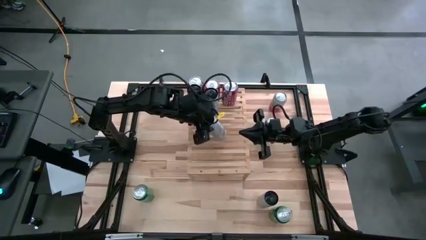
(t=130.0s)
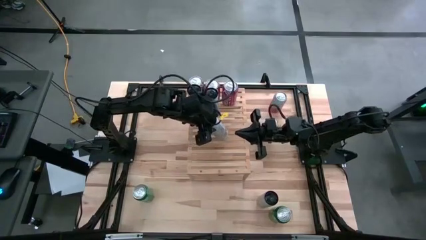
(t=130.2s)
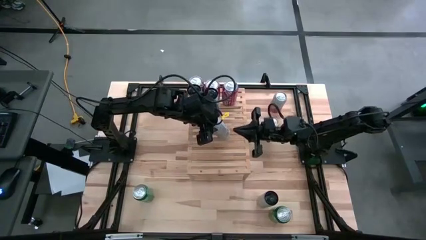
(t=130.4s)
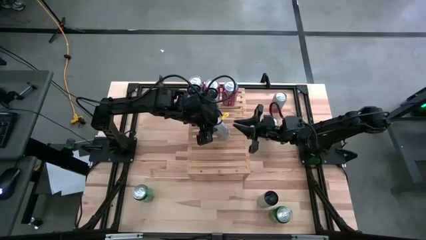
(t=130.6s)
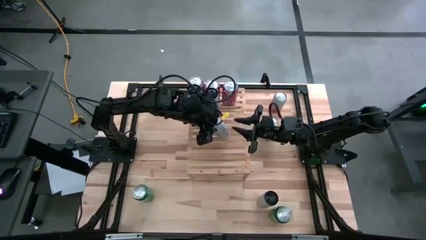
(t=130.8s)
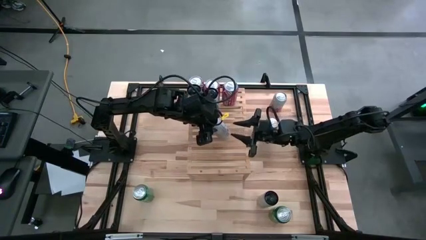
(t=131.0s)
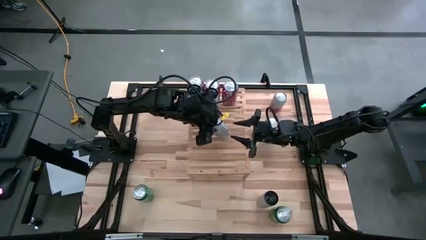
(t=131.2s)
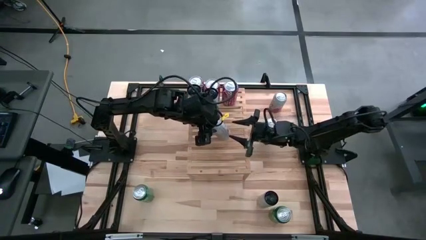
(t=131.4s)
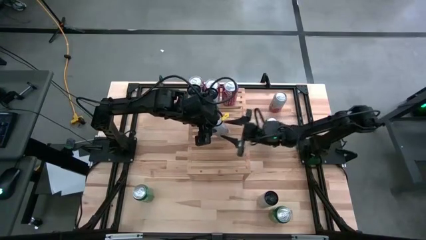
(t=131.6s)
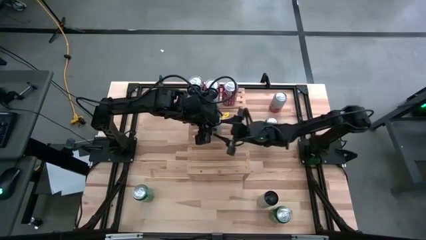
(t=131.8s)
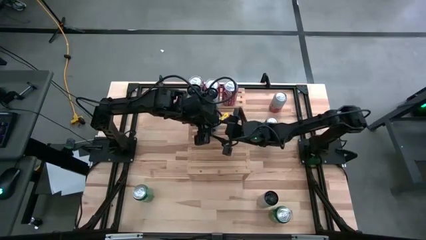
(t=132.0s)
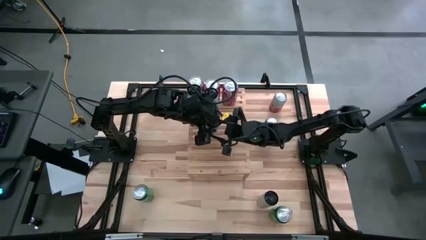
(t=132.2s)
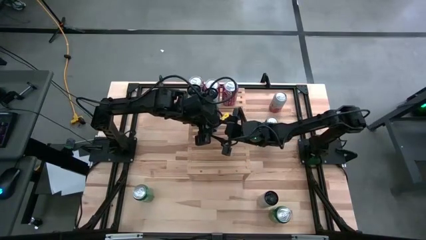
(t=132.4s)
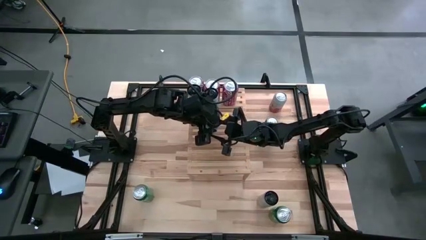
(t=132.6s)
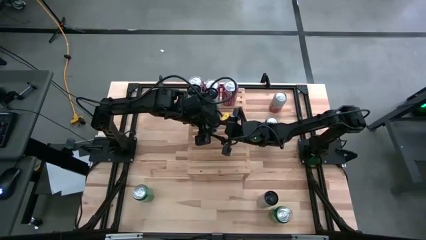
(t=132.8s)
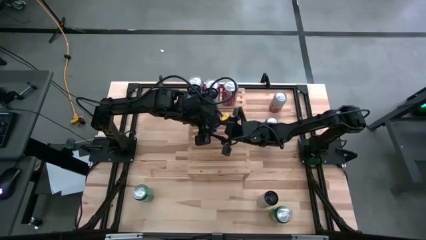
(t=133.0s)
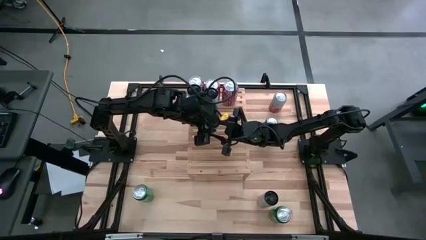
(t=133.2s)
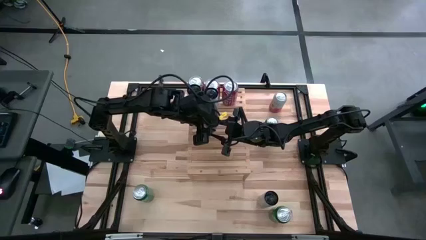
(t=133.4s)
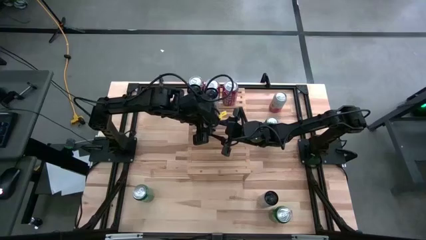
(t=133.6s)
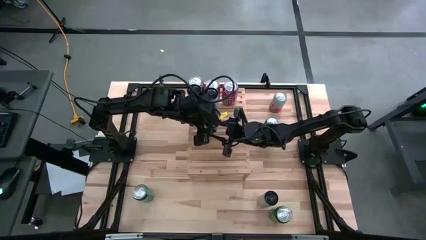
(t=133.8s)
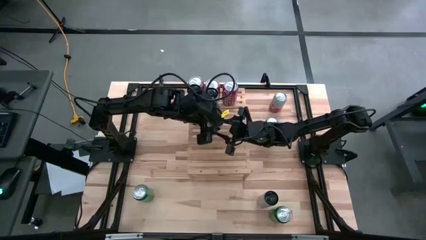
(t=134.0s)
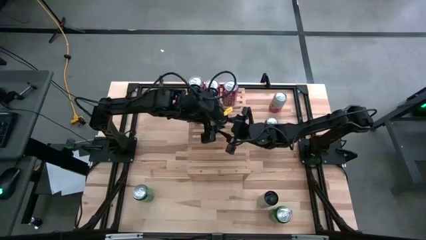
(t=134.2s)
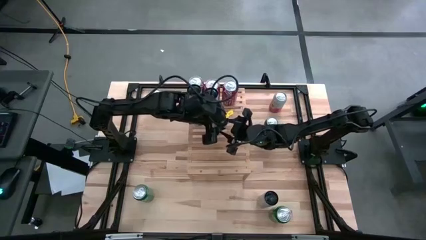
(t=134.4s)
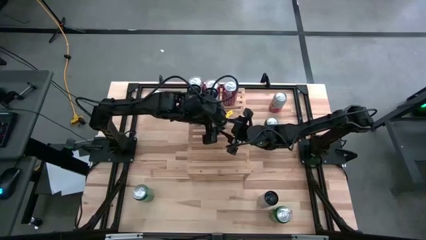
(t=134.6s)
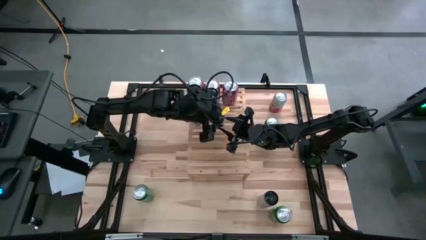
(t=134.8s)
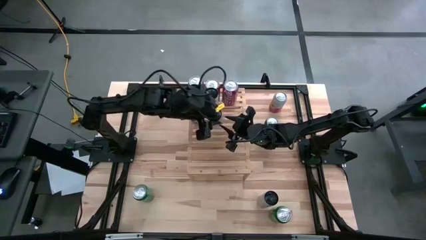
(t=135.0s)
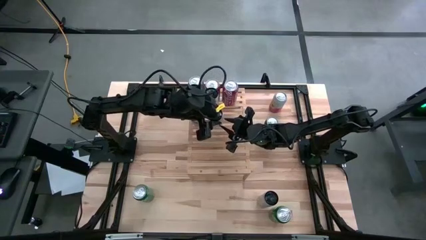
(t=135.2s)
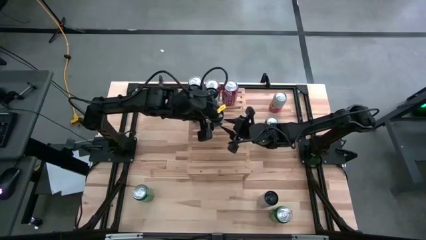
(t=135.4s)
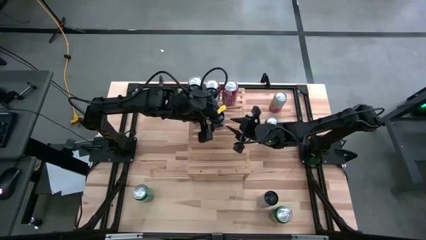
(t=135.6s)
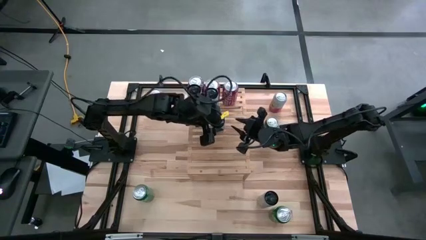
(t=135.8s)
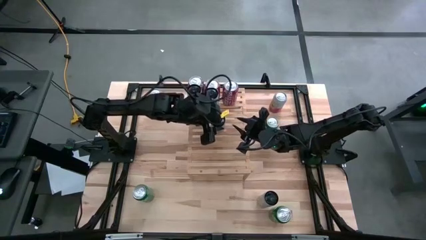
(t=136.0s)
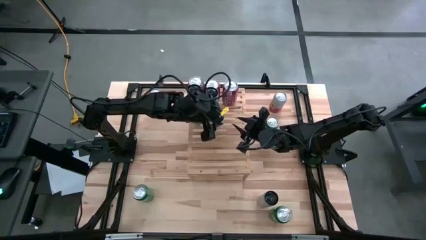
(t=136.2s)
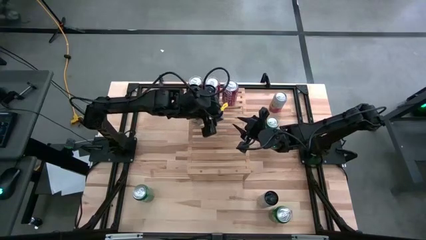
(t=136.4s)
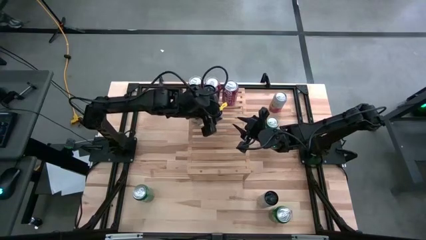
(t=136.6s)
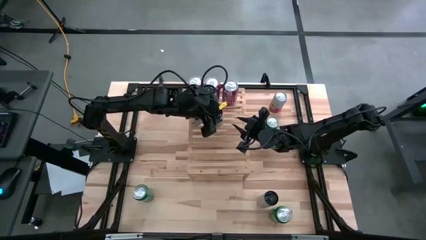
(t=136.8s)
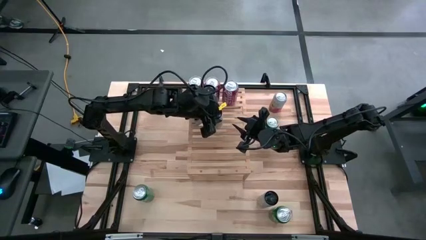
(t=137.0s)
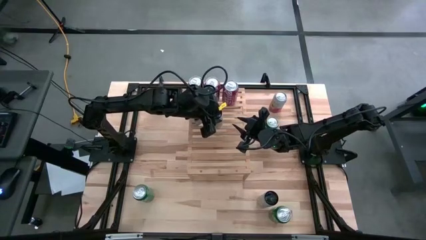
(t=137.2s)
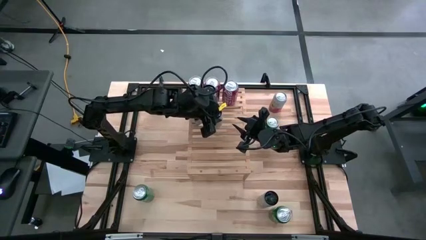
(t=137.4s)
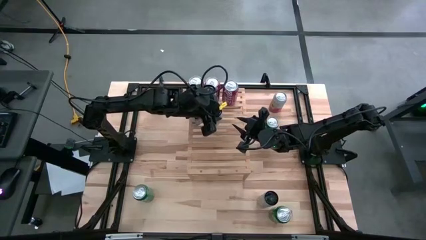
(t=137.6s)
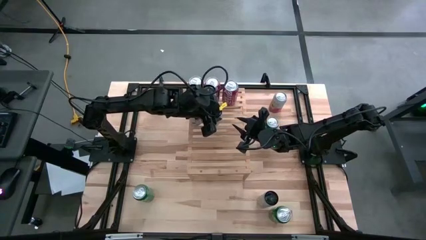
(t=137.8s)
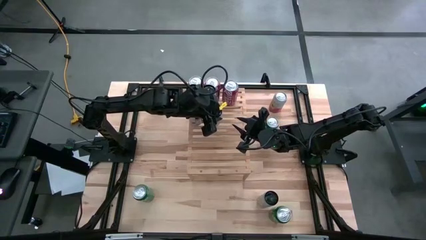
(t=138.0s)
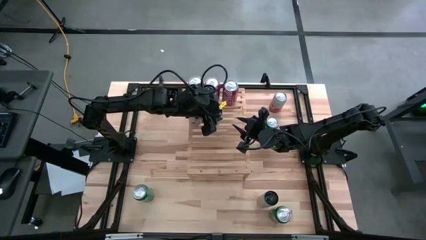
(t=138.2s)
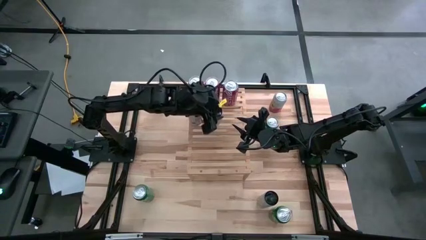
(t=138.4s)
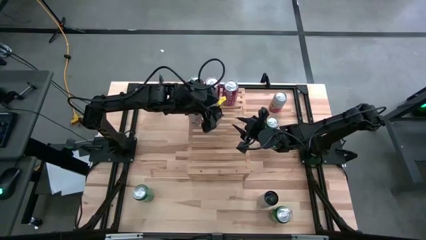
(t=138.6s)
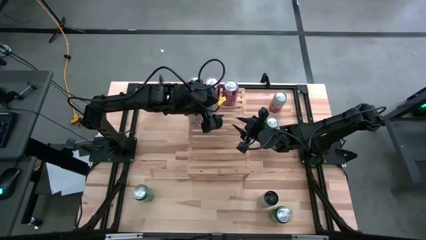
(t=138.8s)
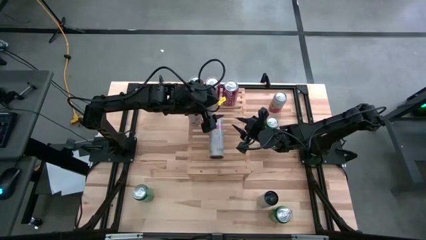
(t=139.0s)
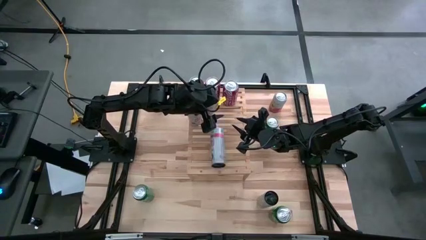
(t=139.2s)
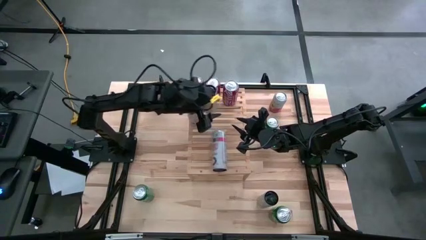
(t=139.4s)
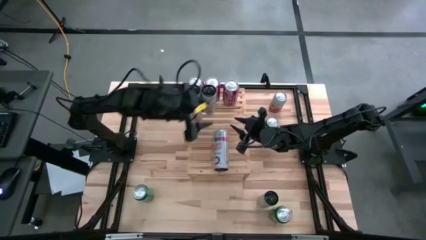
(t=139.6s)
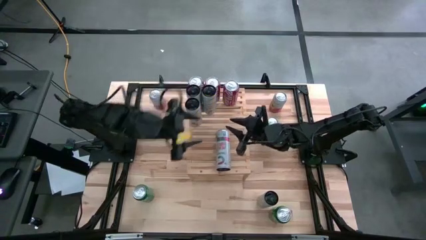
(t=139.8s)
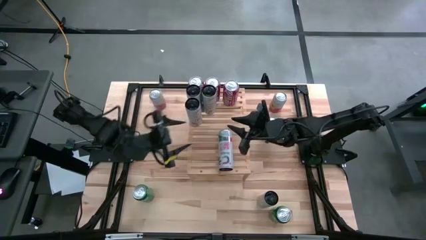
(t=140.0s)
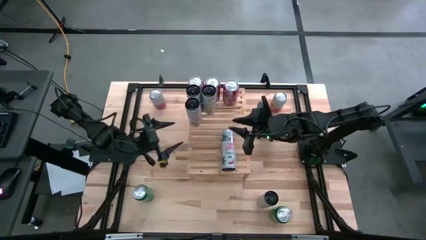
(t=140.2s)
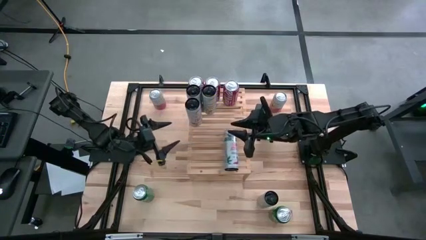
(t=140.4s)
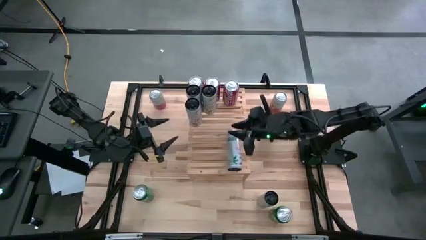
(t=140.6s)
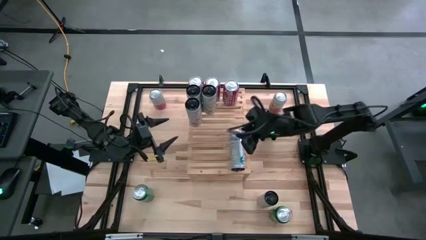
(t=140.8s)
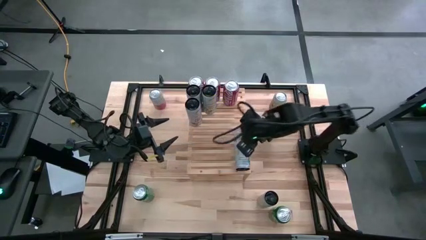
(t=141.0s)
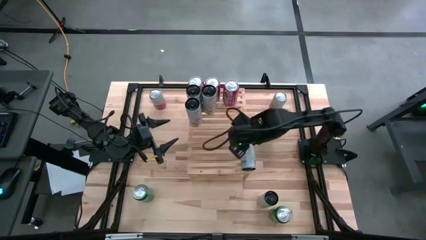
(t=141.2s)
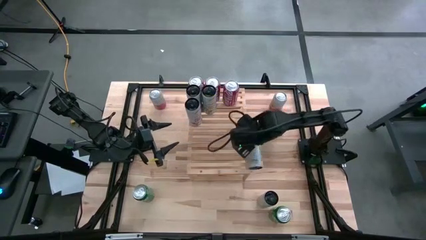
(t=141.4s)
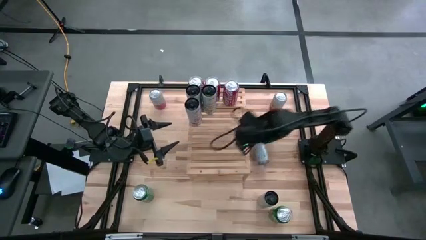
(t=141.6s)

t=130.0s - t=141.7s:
Task: Place canned beverage on shelf
Align the bottom left peach vibe celsius soda can with the other peach vibe celsius soda can

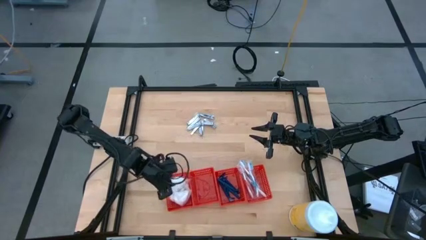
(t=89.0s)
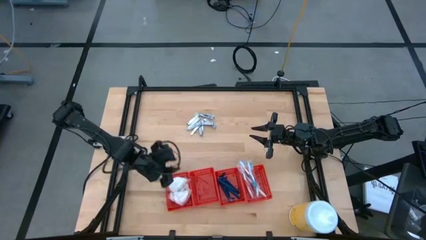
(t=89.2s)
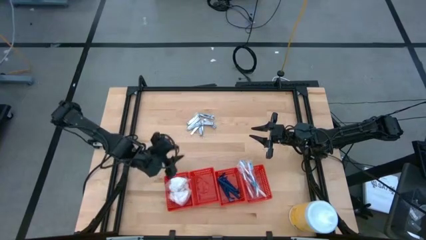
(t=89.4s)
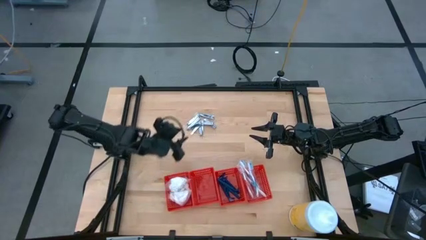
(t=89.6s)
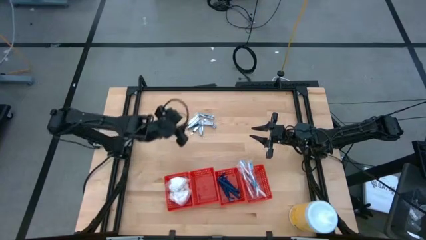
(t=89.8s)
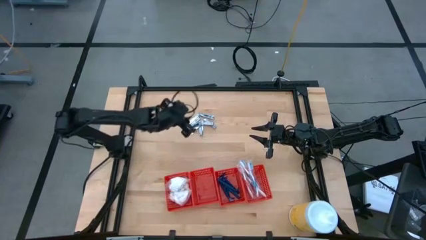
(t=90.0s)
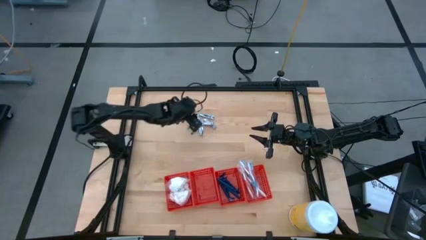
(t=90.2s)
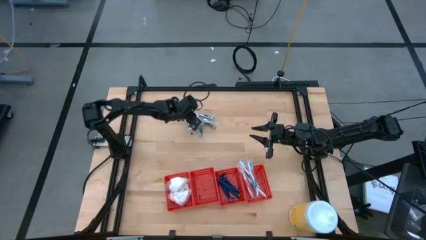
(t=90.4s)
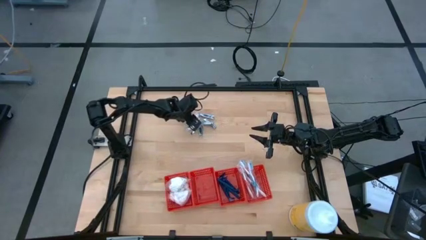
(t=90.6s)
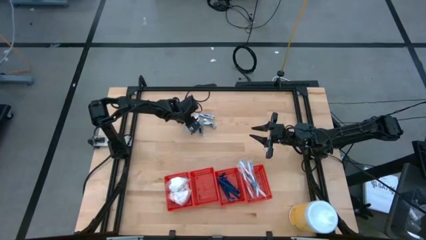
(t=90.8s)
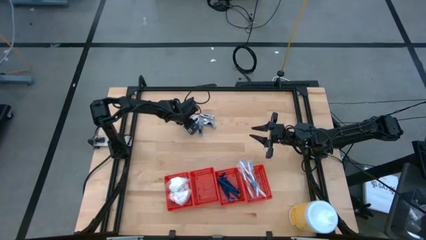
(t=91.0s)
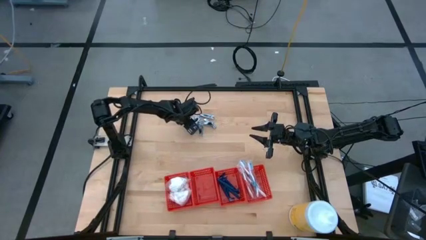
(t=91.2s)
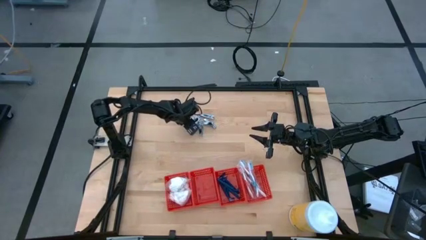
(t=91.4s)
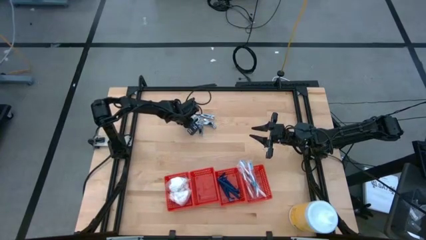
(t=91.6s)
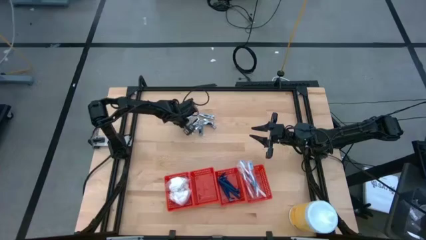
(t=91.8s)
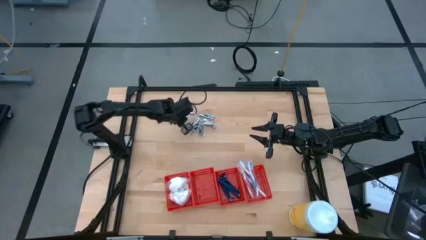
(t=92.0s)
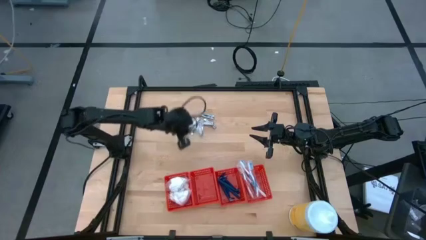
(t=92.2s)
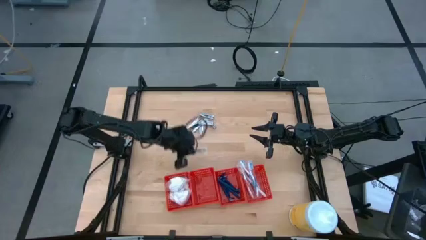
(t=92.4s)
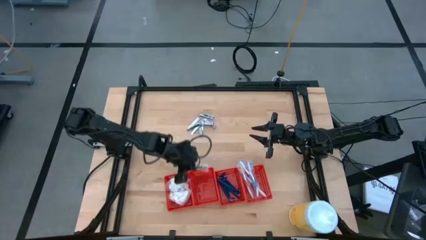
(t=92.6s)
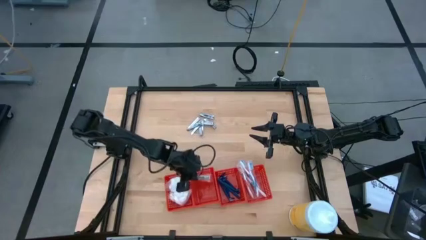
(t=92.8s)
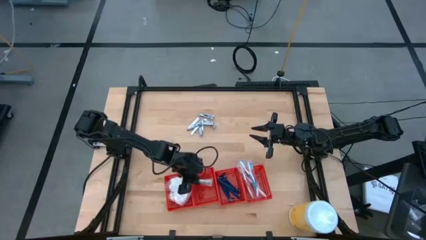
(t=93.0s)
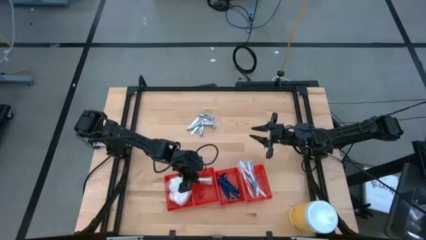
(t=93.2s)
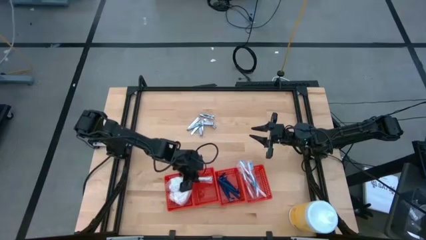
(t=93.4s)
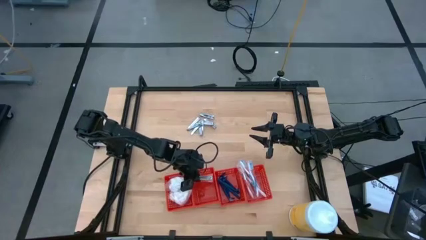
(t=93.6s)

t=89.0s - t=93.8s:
Task: Pick & Place Travel size toiletries
Put the silver nail cutter into the middle left red bin
